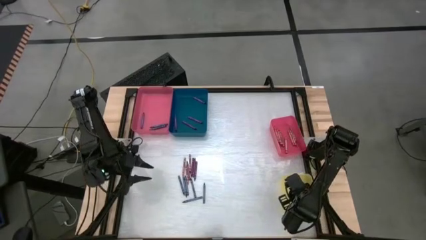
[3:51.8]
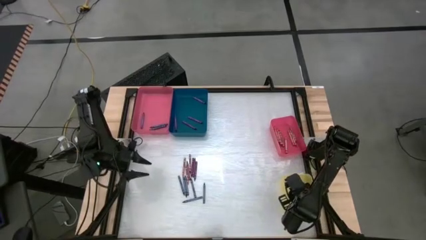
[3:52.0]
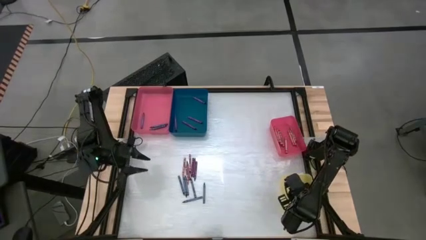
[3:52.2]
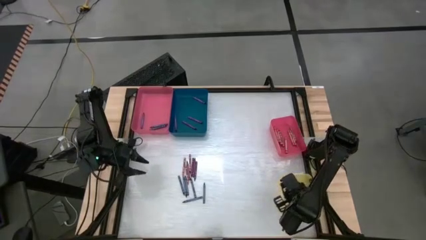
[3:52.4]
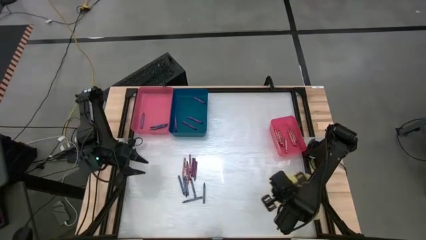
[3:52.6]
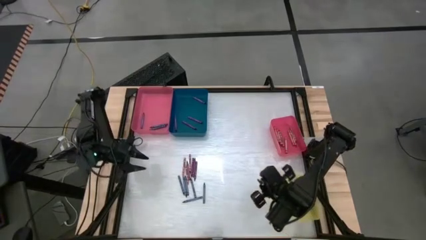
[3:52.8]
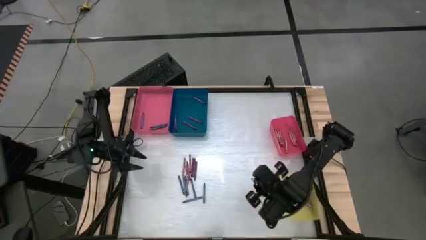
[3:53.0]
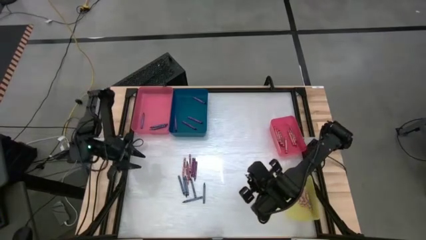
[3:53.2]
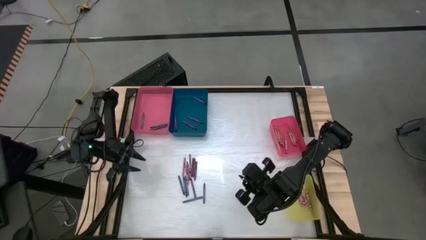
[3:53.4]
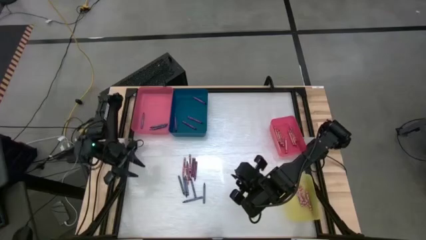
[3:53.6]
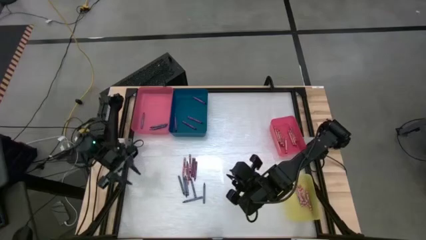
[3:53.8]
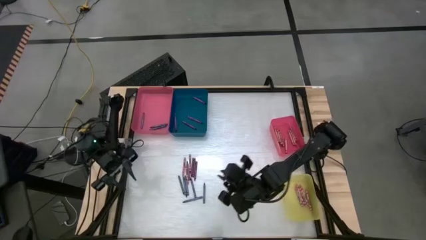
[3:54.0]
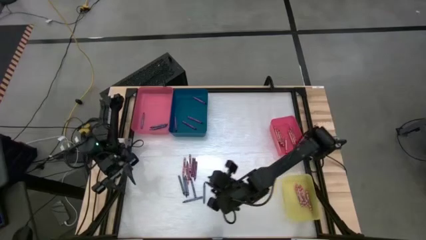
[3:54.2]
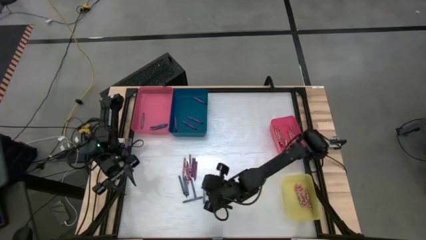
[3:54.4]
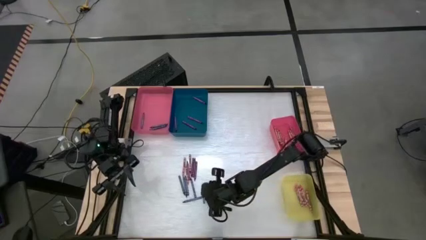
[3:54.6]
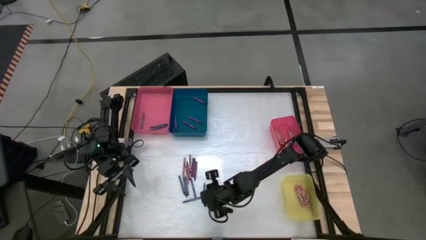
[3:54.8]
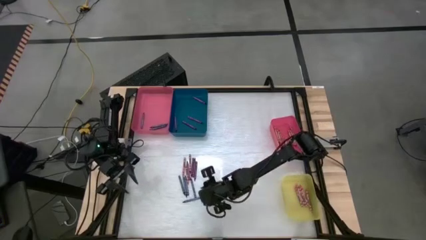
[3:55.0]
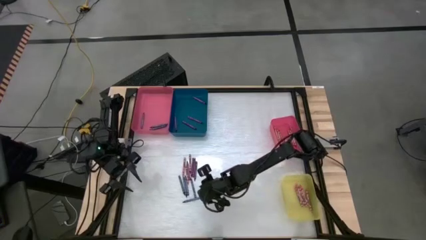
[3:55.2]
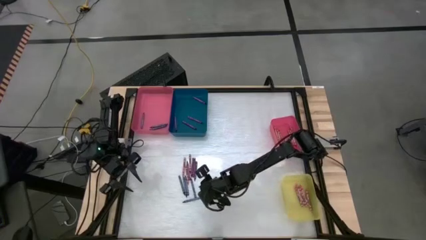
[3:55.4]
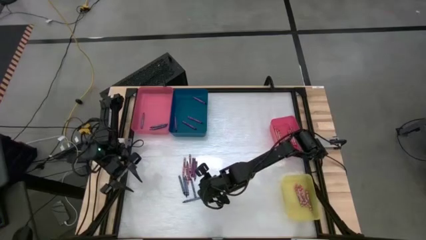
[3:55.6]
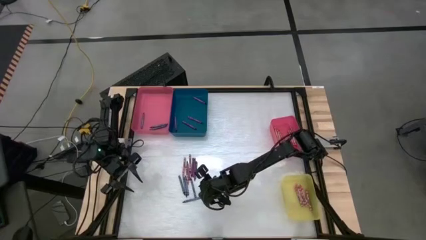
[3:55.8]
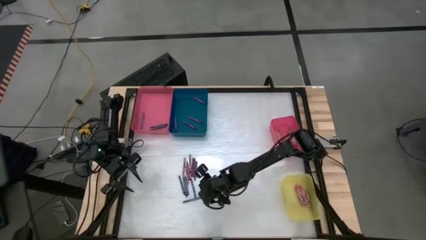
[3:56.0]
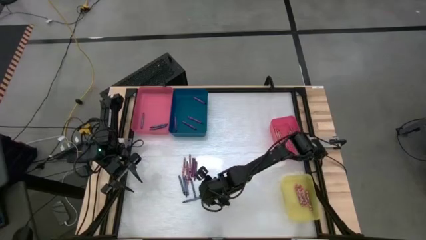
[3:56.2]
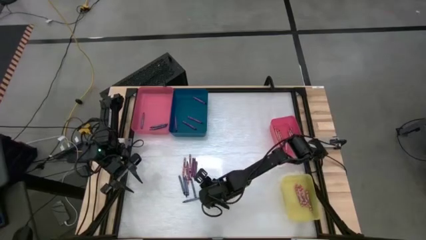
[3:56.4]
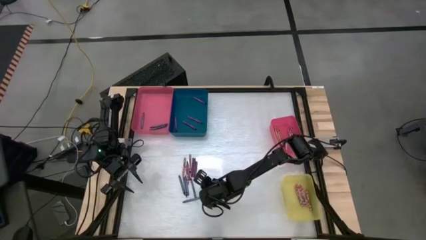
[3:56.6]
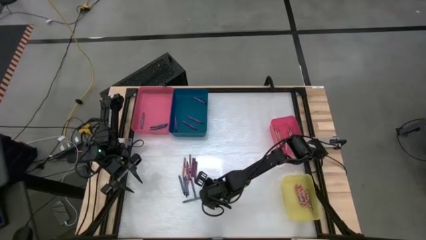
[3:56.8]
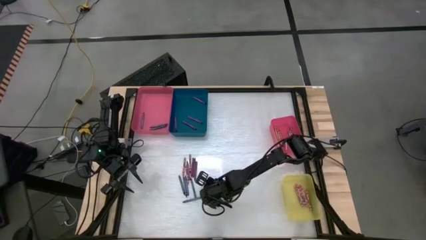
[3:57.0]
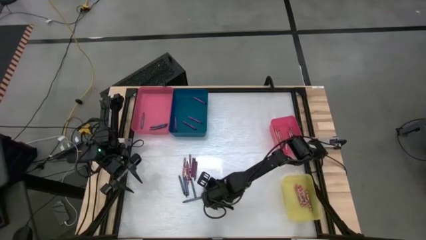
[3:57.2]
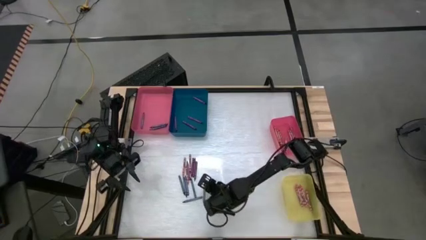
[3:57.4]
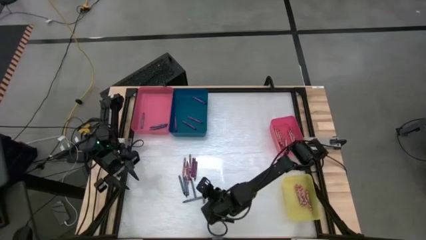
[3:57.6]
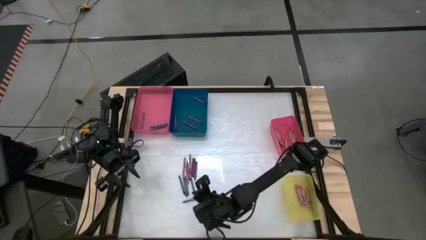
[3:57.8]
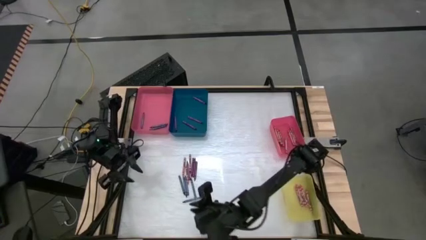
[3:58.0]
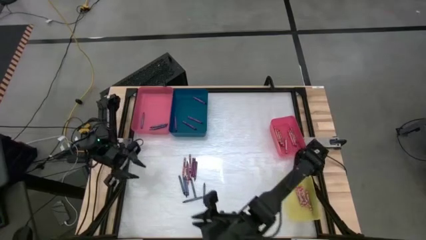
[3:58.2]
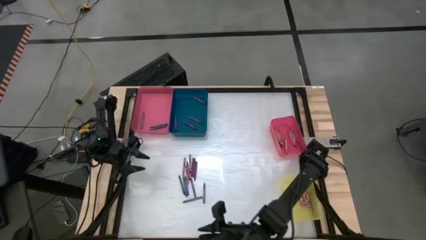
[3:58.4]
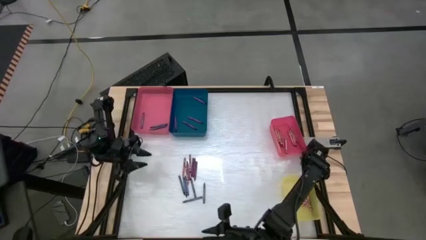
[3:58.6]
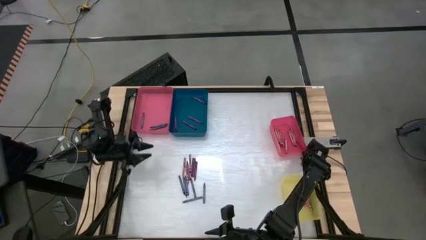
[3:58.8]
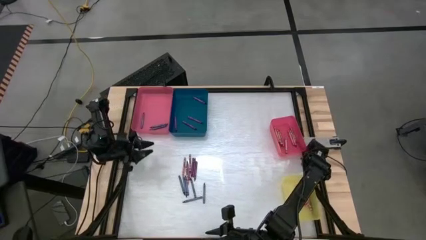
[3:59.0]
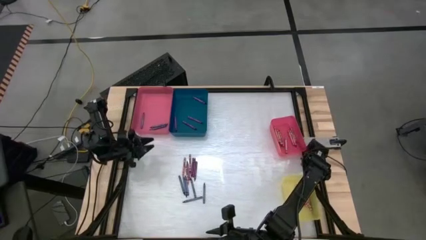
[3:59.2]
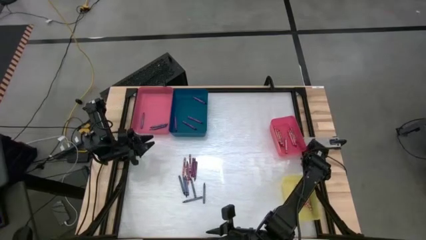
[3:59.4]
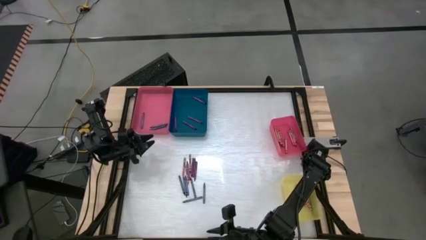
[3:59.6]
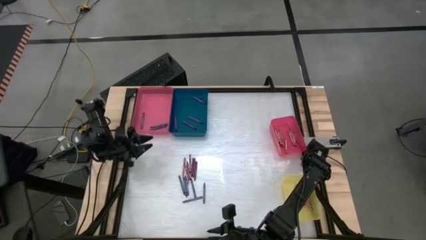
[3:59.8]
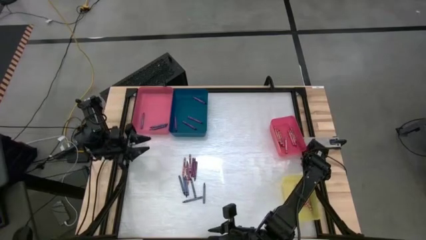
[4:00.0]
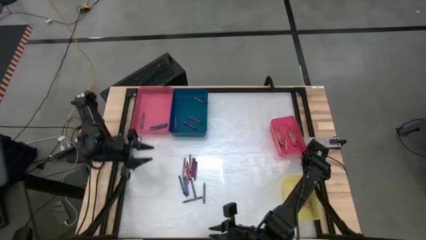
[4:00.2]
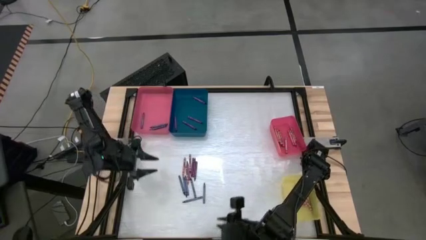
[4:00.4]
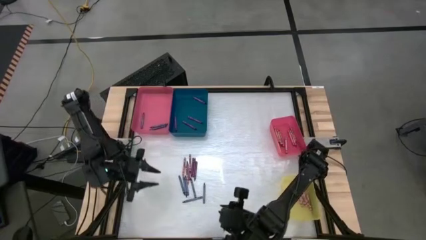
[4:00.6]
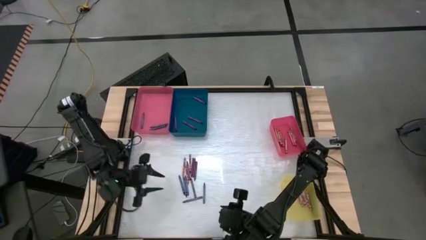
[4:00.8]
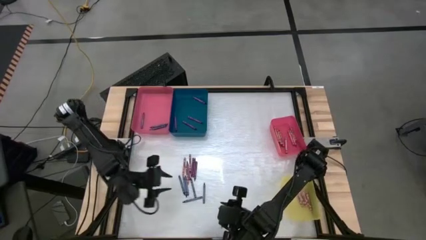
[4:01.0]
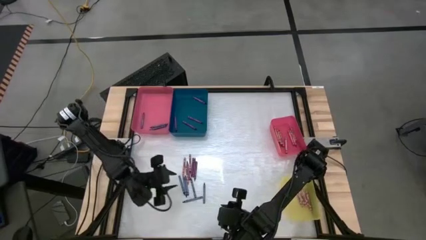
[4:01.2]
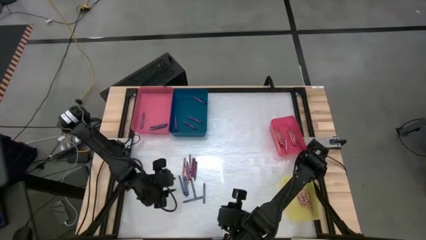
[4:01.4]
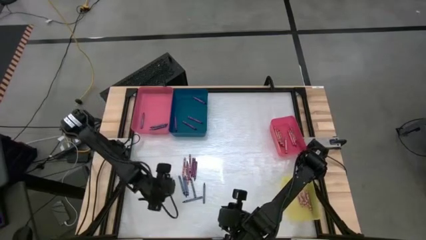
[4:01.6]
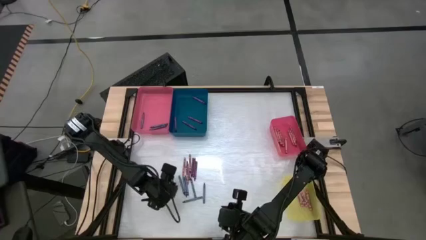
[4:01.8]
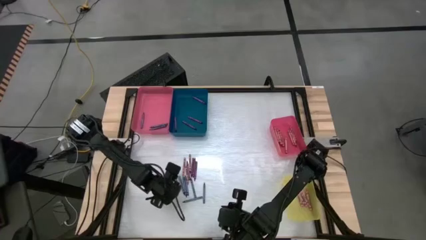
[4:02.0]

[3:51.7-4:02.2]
Task: Sort crayons
Put the blue crayon into the large red bin
